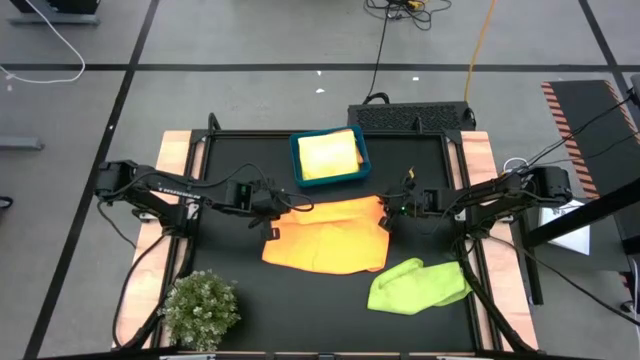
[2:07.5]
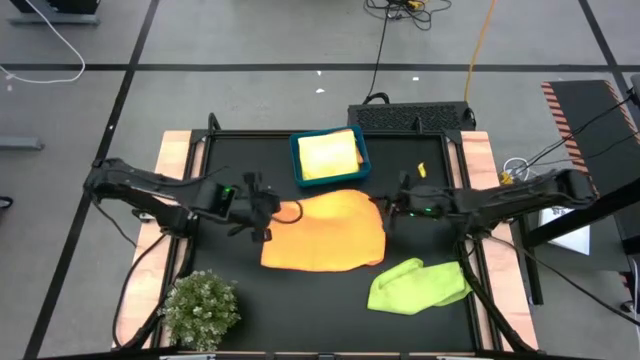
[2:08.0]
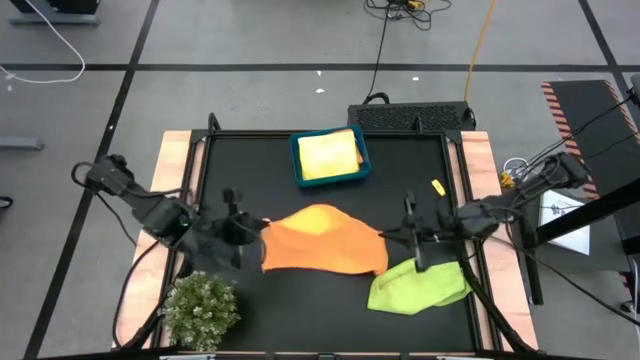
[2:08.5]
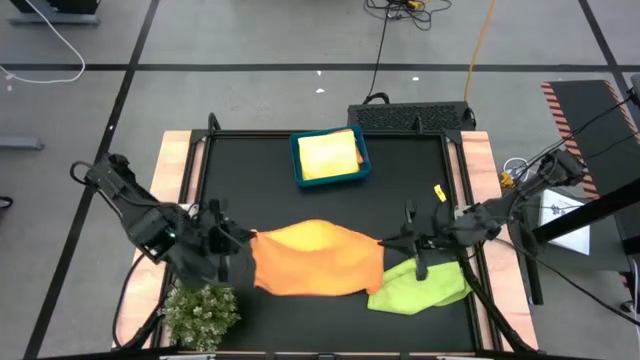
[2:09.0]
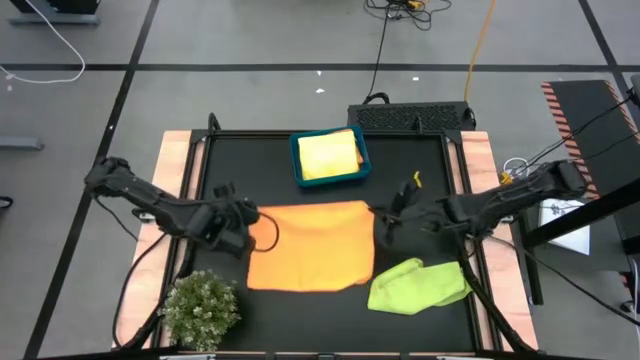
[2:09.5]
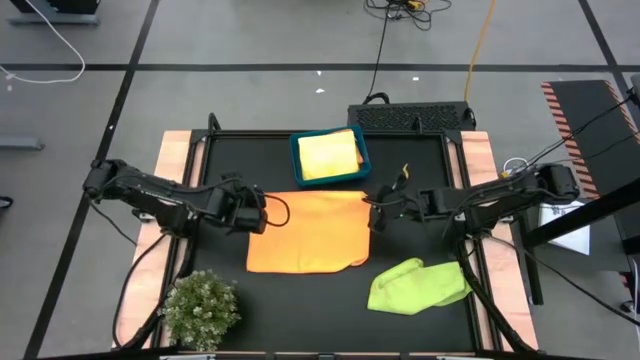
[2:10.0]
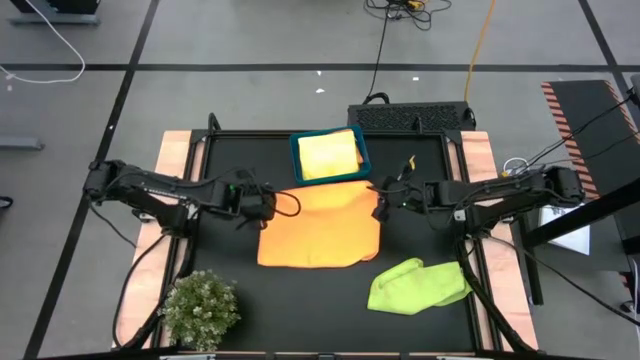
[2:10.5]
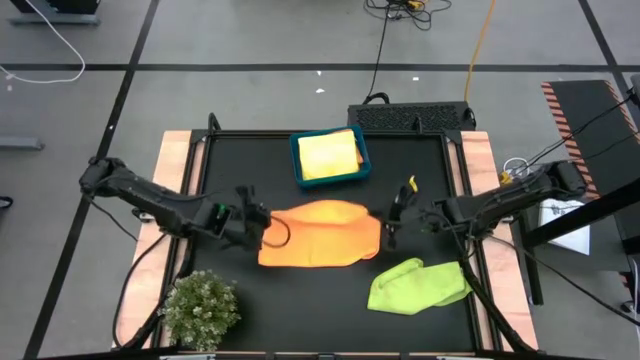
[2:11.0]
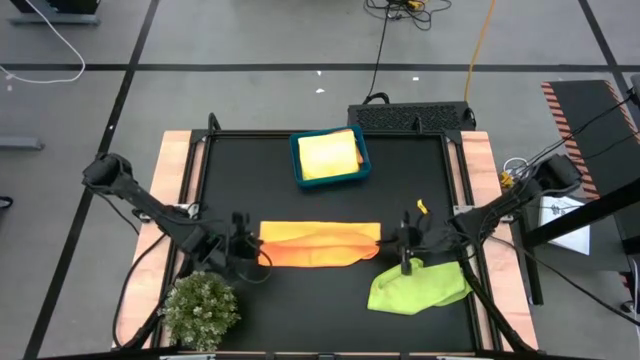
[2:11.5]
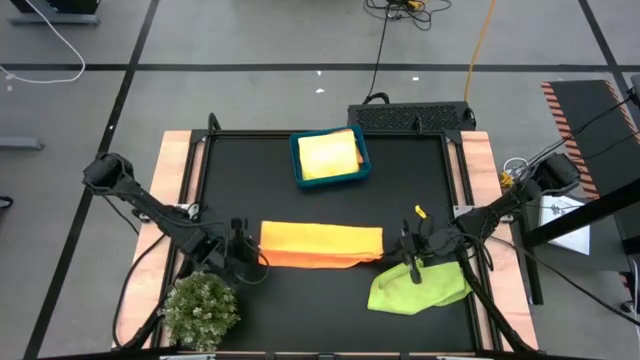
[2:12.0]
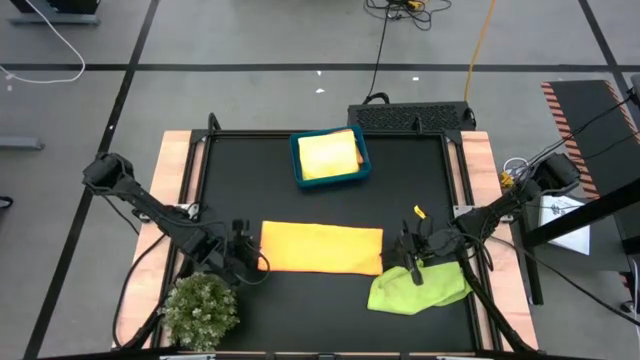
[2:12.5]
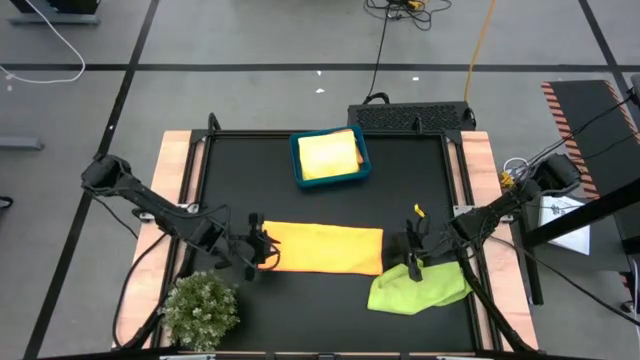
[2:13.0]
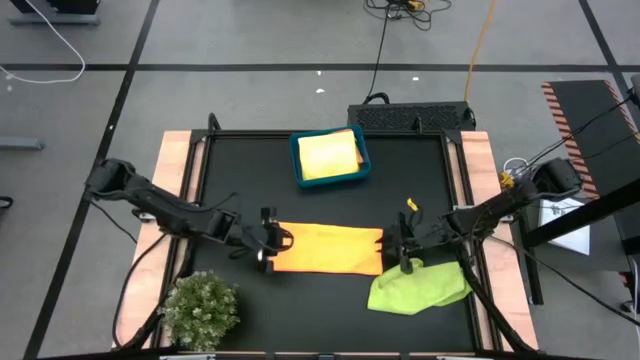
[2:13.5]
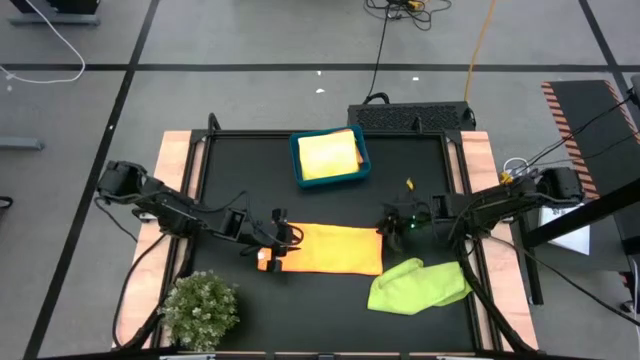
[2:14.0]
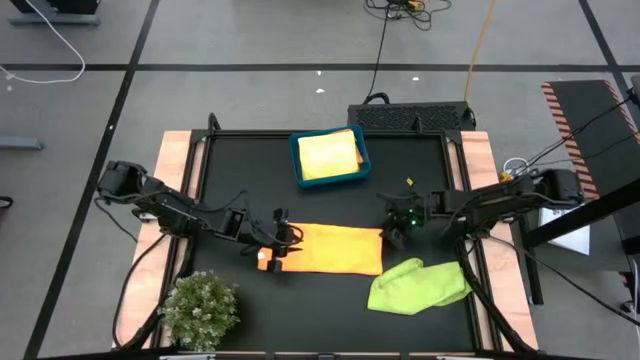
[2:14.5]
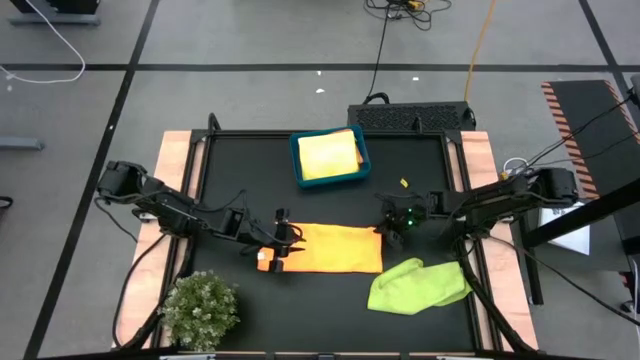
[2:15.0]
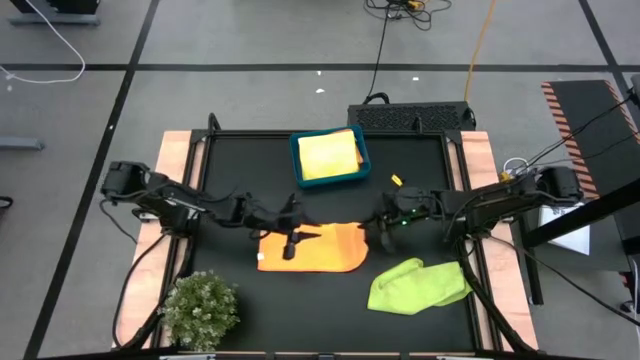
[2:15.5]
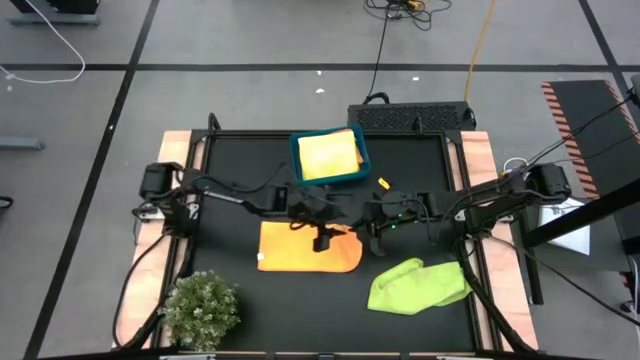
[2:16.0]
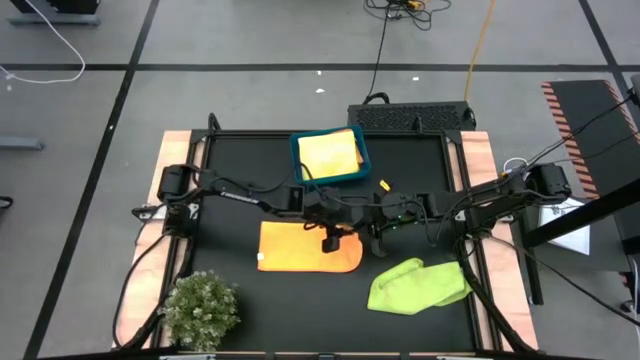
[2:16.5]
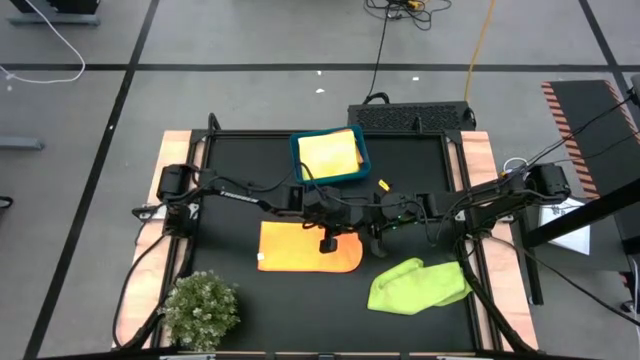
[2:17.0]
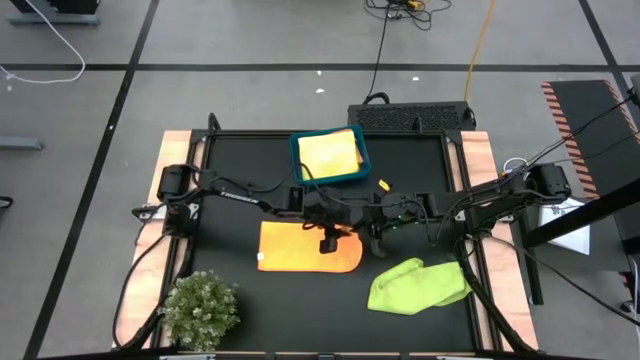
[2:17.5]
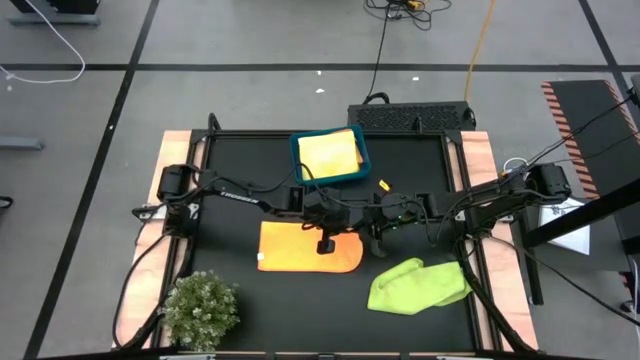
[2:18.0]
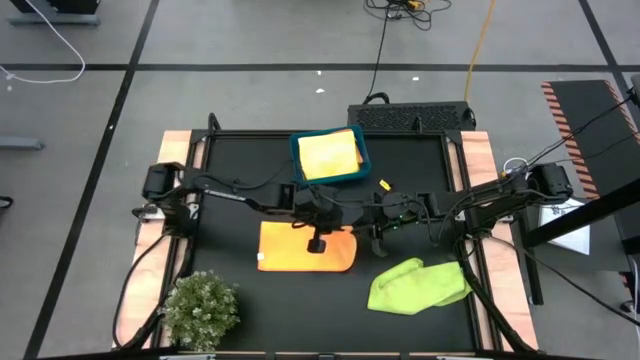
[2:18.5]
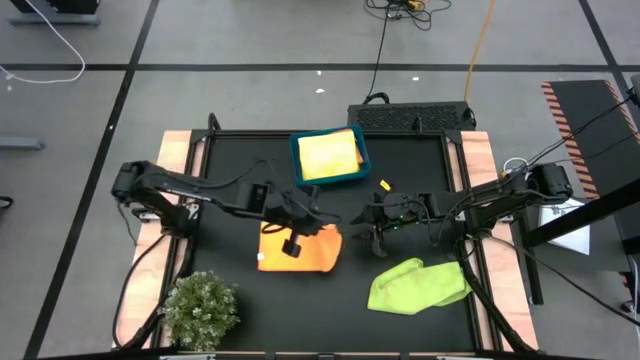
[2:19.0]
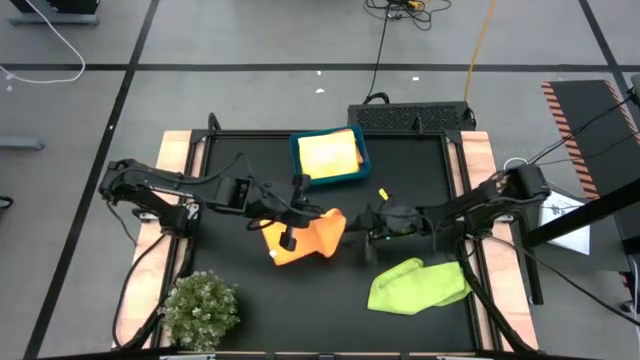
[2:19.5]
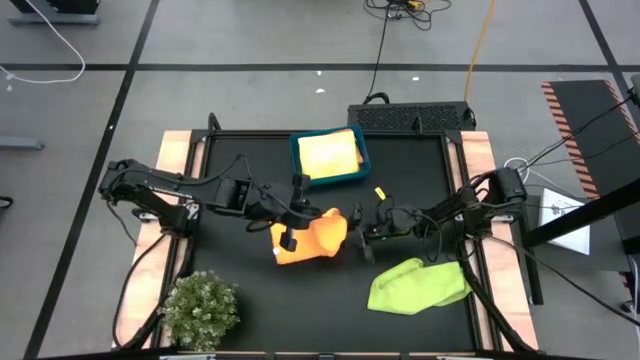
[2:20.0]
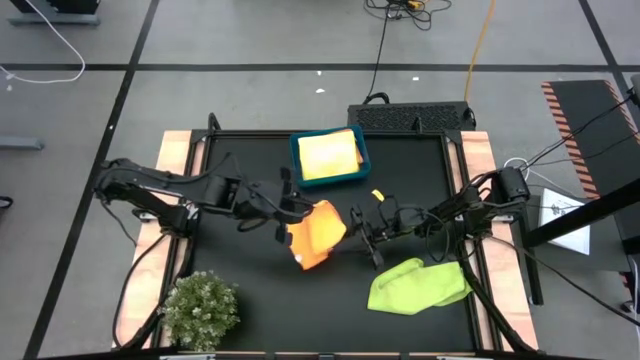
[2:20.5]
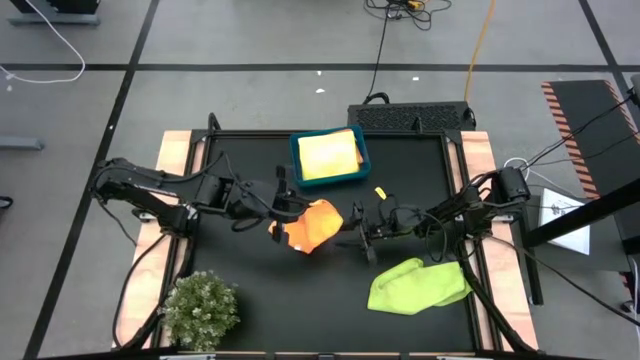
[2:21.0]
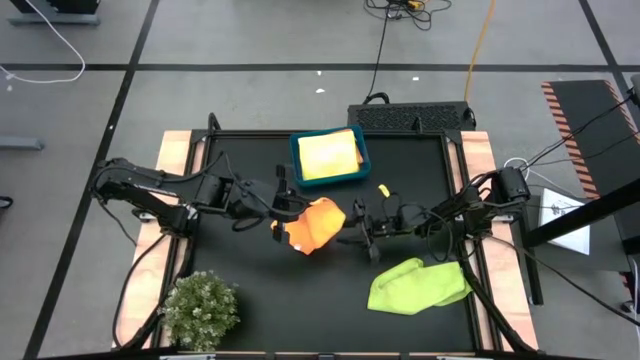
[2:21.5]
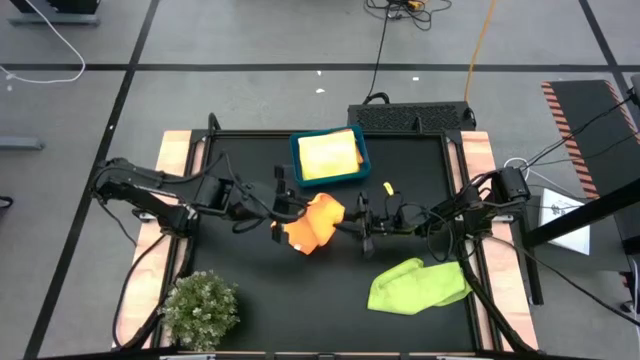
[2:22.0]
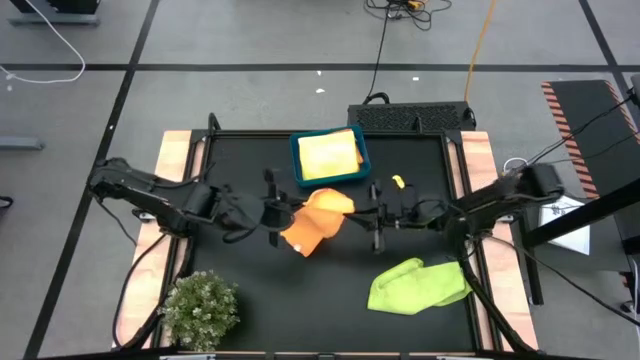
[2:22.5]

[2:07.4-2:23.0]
Task: Fold microfiber towels
Fold the orange microfiber towel

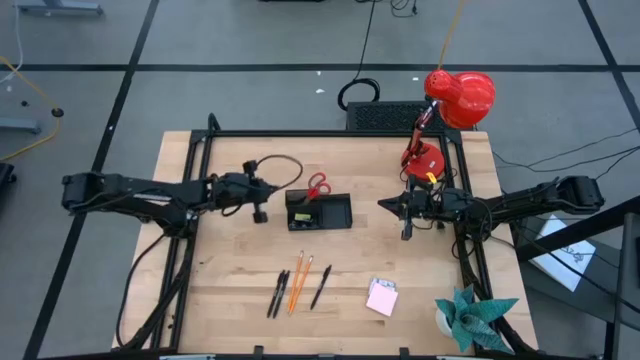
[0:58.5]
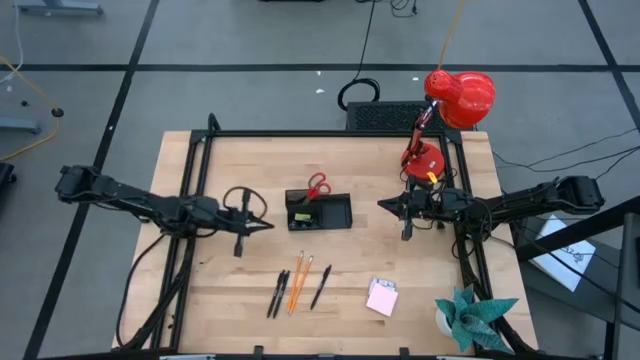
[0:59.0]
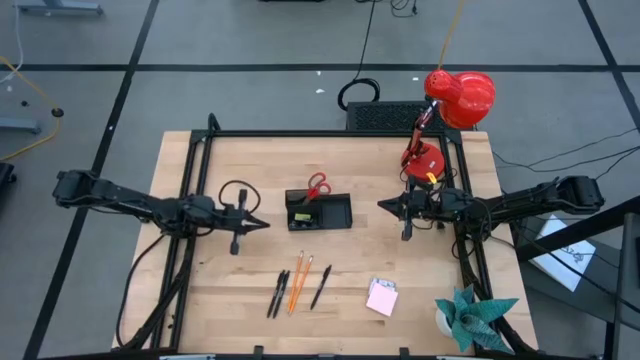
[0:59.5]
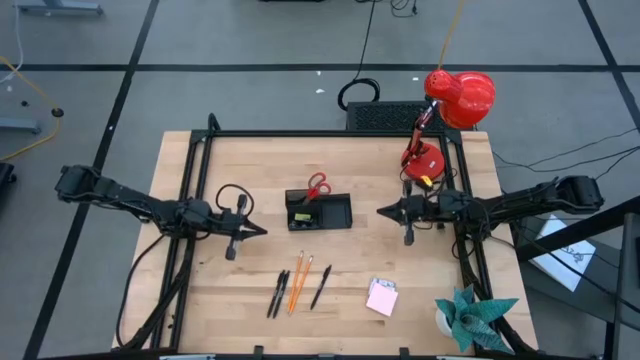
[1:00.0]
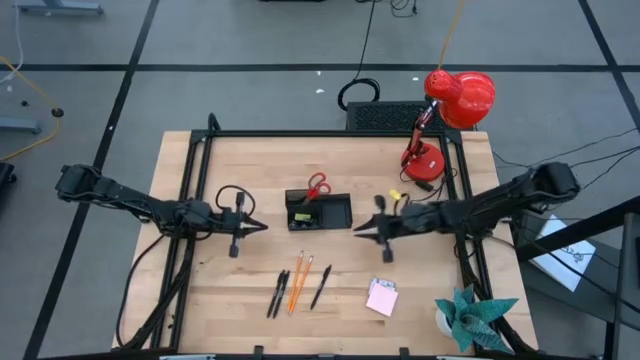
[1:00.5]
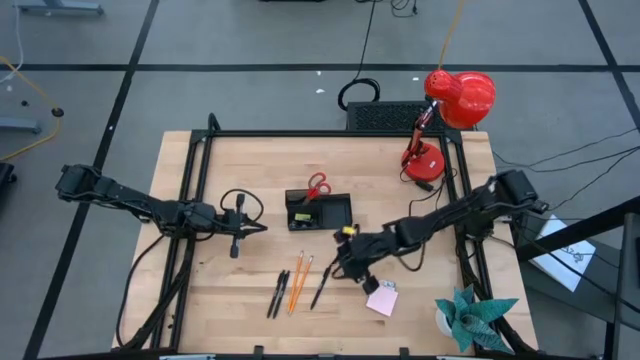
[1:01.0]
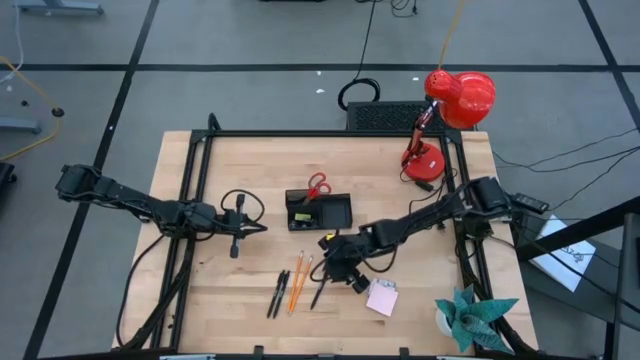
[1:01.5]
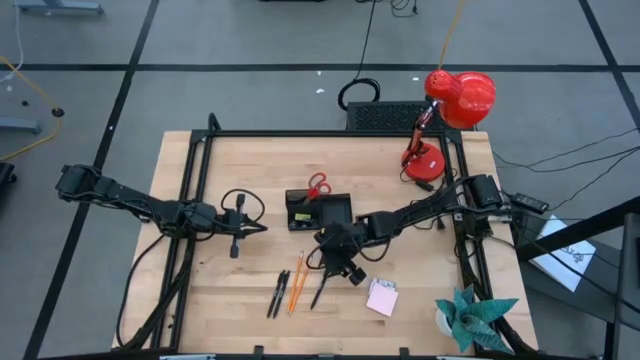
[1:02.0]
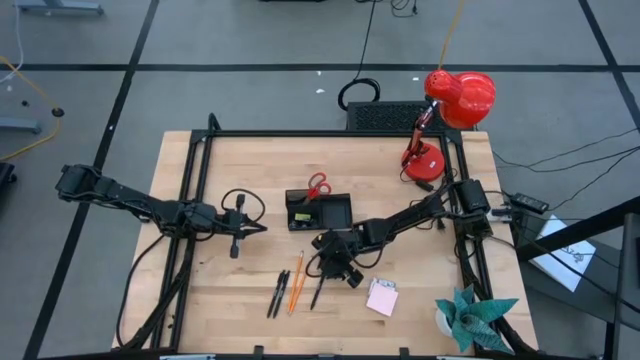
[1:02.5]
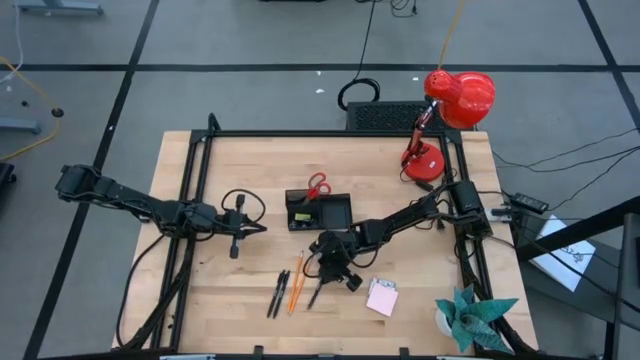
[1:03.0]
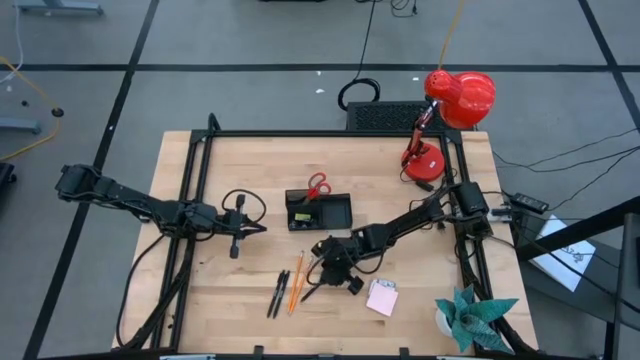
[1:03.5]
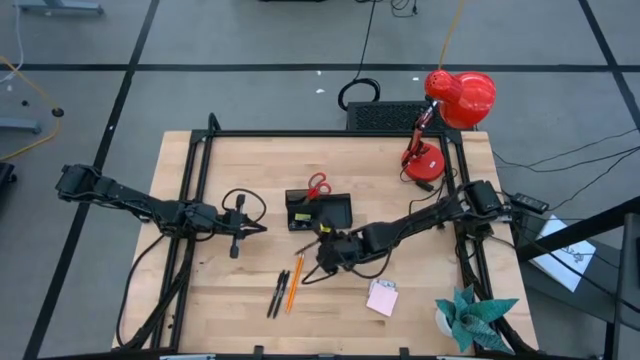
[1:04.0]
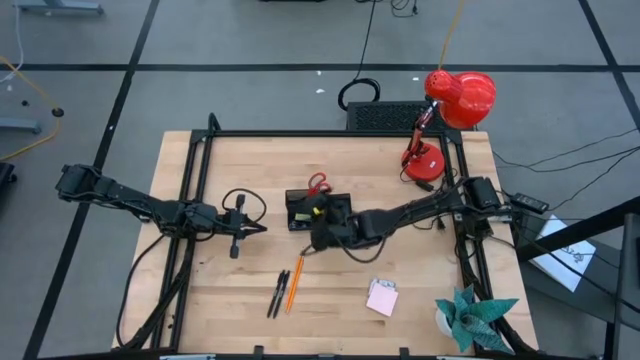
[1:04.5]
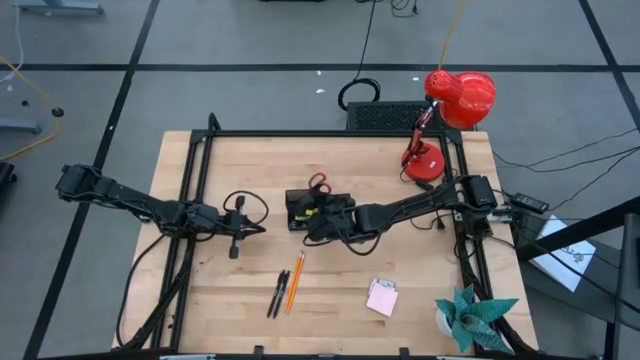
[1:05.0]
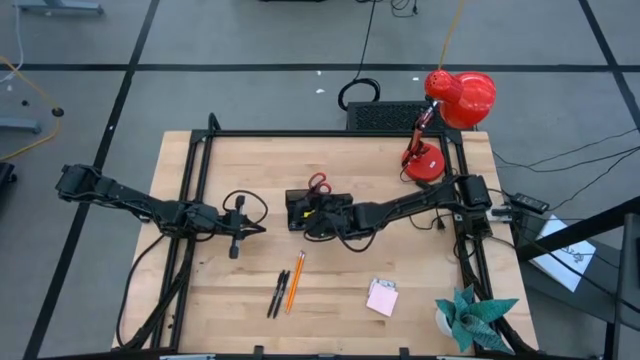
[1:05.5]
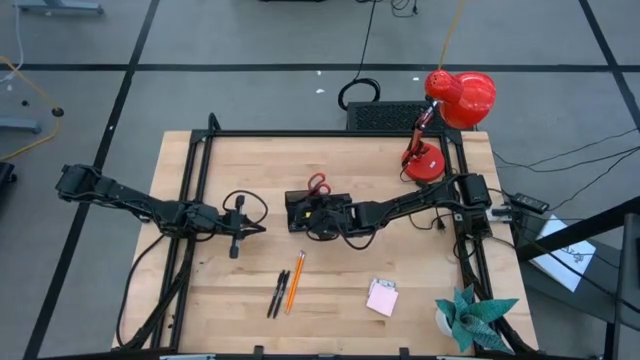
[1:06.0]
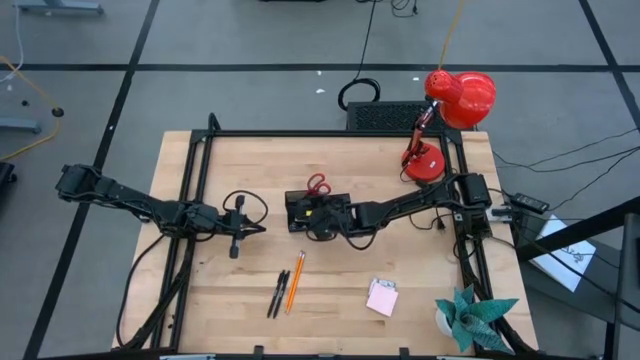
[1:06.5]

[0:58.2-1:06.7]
Task: Pick and place office supplies into organizer
Put the black pen into the desk organizer
